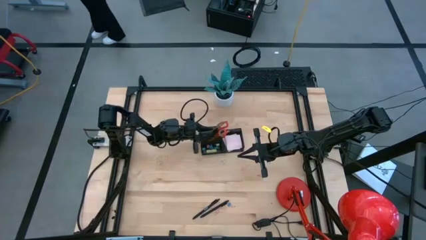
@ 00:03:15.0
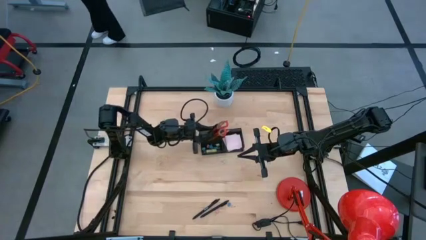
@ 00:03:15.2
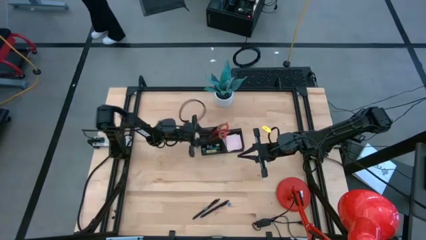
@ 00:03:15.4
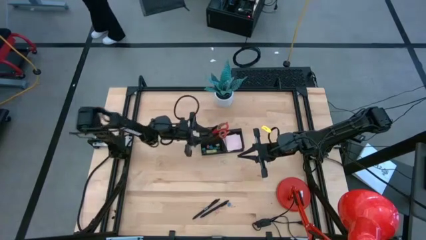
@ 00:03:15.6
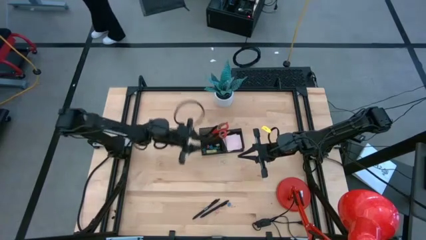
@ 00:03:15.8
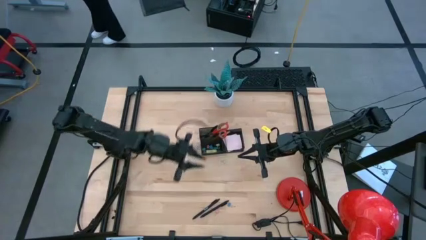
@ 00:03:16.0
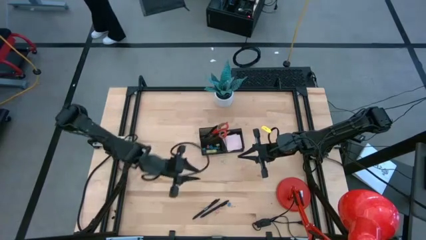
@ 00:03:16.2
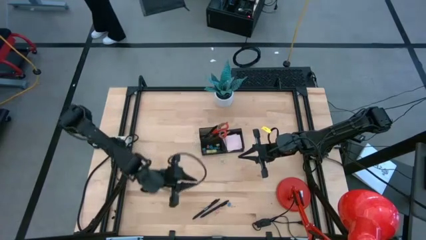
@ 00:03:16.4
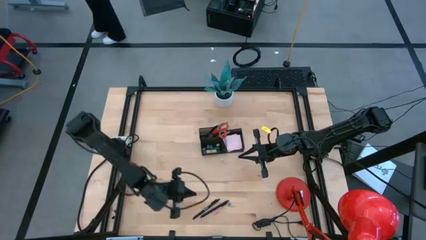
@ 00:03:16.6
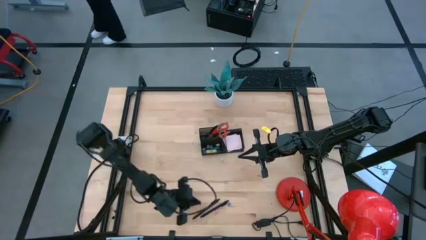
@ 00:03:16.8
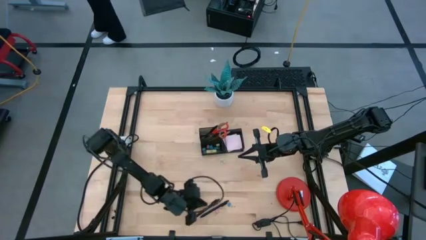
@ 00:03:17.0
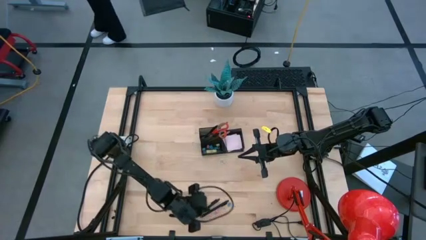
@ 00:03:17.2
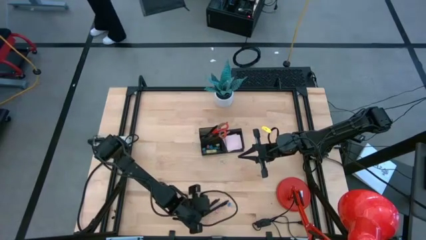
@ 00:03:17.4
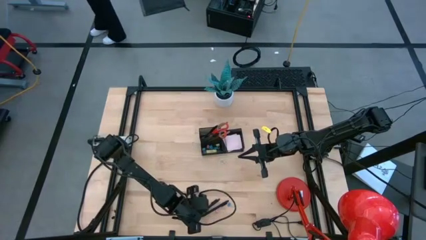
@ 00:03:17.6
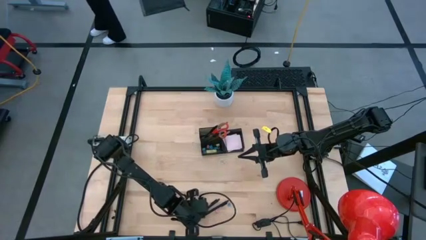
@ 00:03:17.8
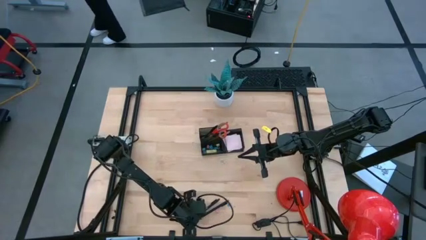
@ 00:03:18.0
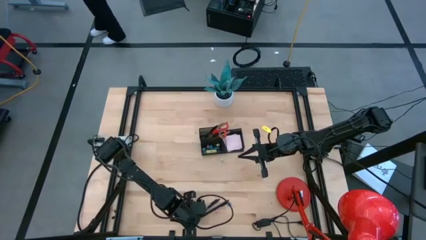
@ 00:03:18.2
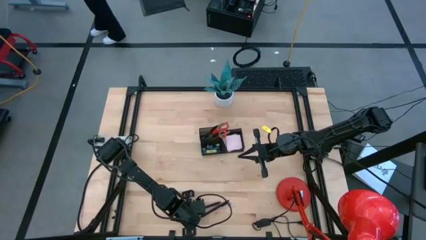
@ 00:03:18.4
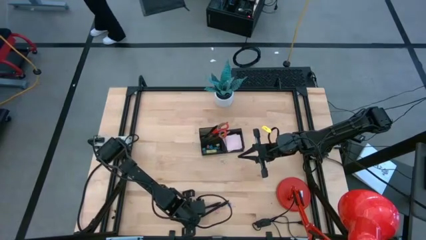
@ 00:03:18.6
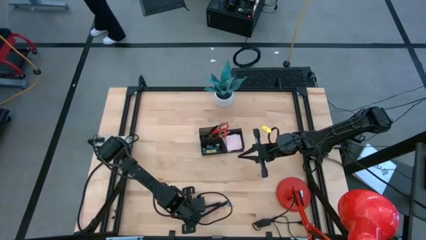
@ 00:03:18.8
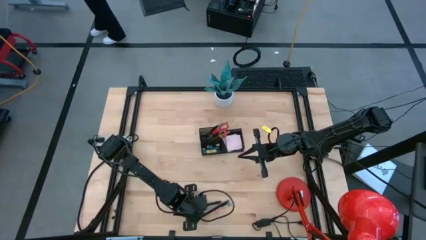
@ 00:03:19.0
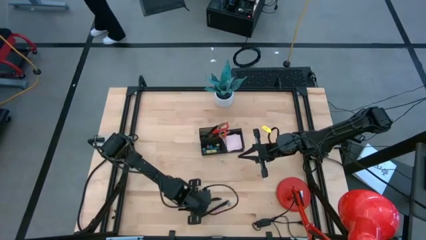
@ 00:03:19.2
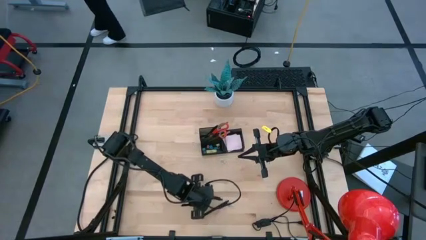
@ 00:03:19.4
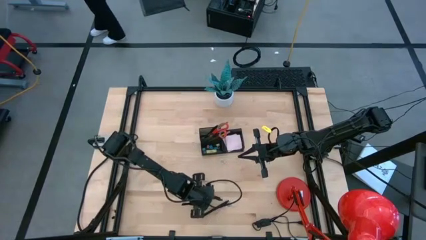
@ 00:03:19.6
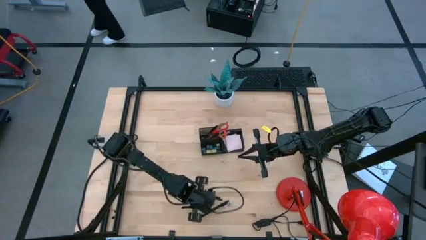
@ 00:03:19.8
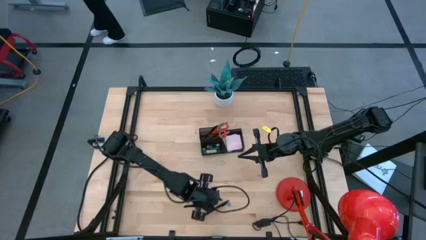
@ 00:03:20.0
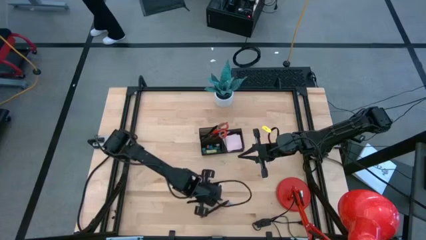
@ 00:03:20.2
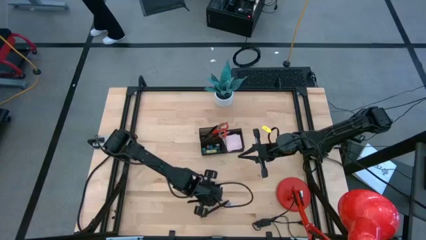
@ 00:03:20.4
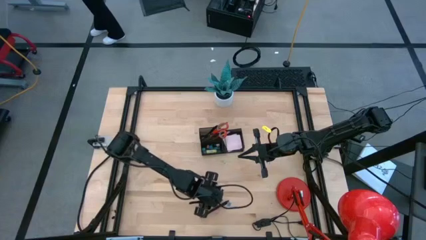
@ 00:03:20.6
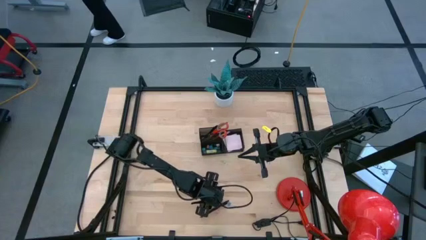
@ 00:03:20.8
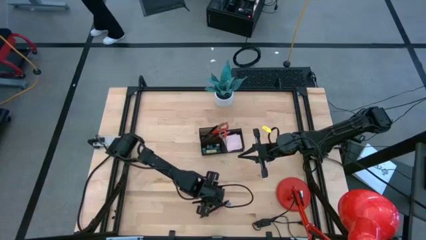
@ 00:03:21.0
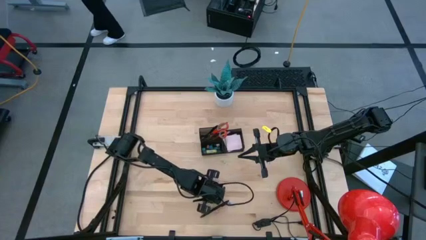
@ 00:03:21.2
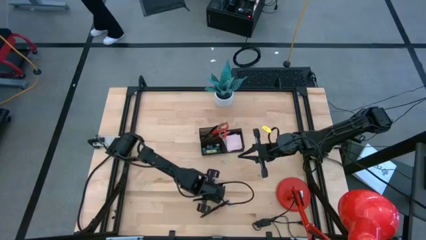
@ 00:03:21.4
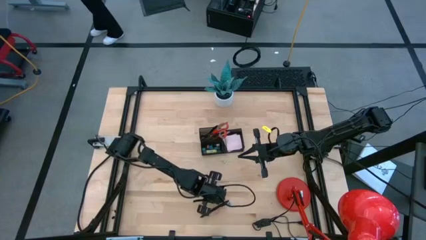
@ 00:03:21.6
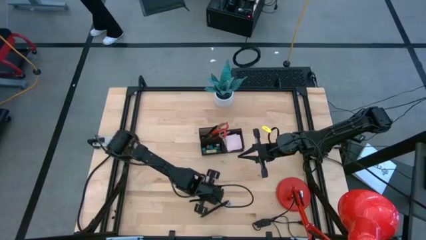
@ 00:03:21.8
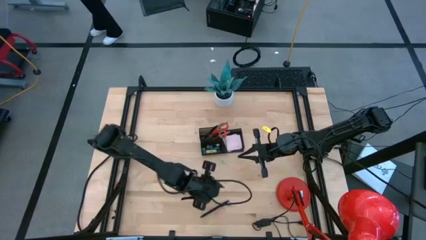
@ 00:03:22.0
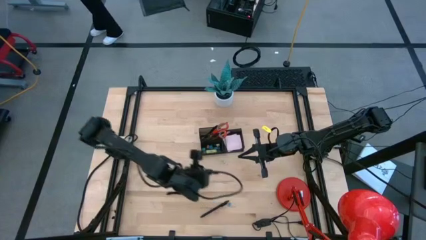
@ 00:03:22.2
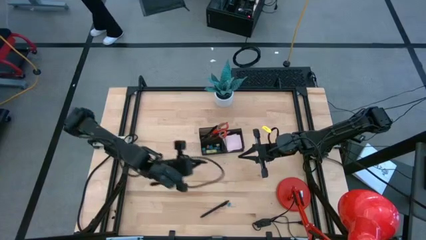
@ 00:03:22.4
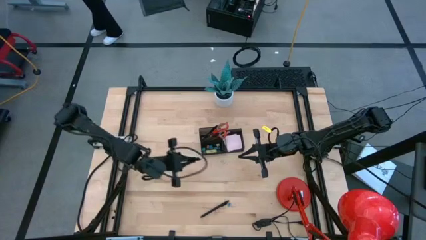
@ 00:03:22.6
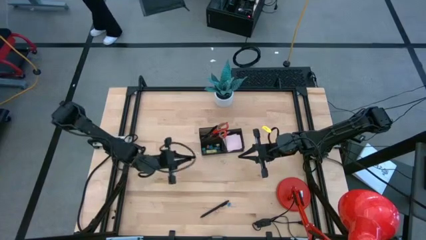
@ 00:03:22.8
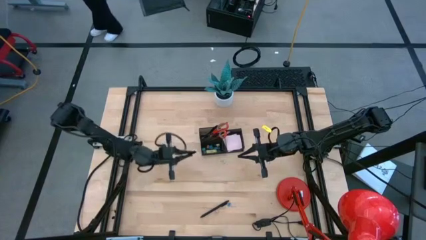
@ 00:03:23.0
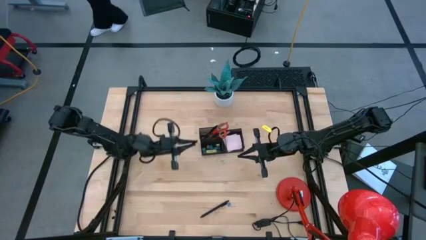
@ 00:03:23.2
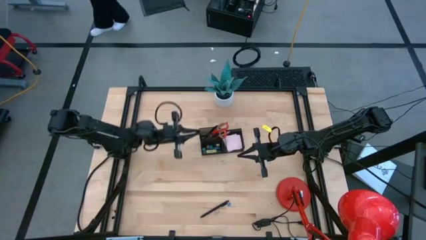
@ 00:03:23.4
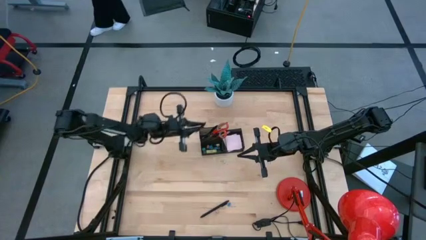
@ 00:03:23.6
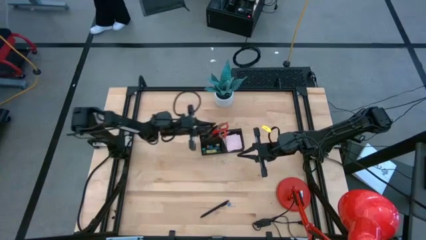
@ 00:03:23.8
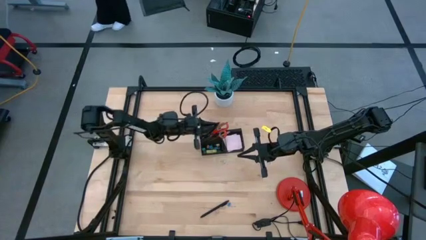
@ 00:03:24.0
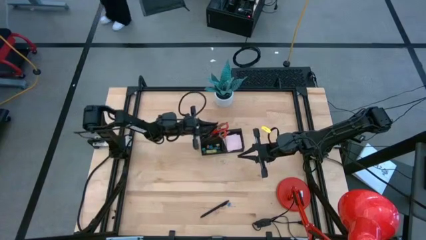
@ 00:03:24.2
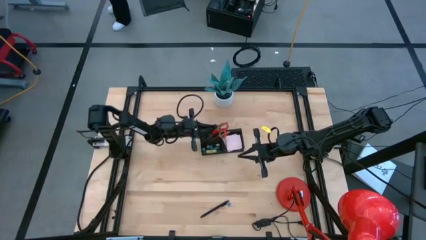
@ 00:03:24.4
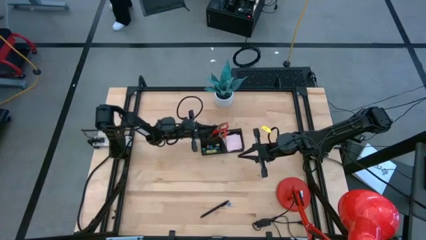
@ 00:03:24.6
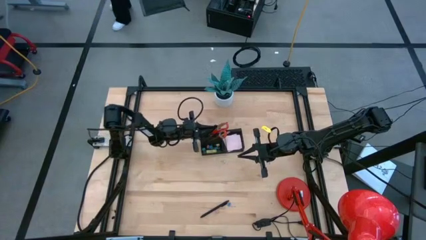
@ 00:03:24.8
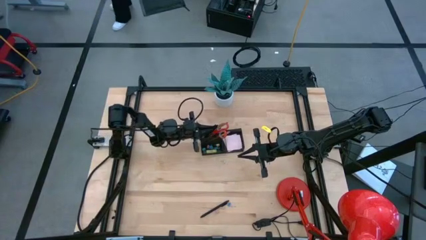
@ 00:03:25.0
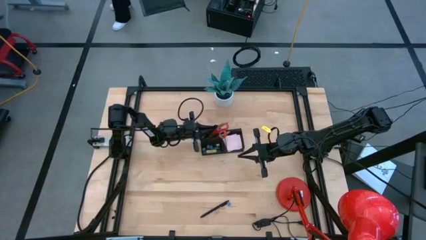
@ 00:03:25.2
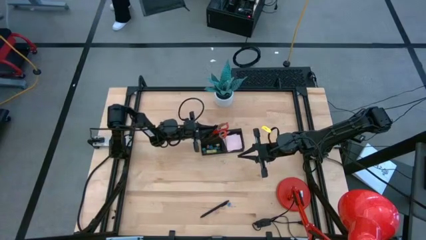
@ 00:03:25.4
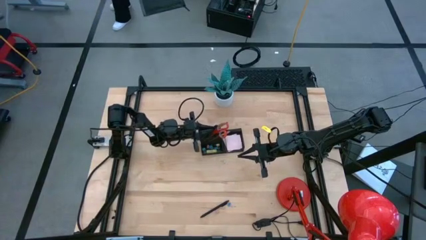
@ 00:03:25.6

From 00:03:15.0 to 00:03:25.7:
Task: Pick and place office supplies into organizer
Put the black pen into the black desk organizer

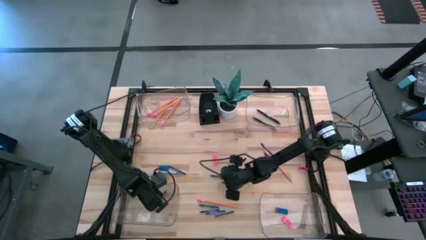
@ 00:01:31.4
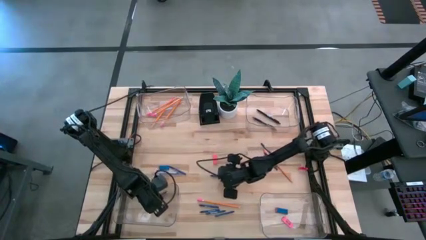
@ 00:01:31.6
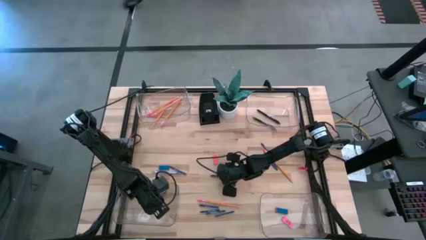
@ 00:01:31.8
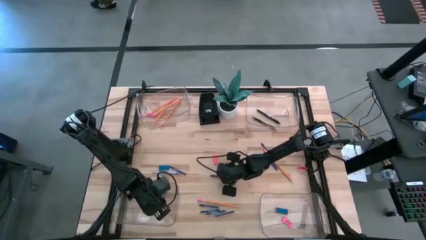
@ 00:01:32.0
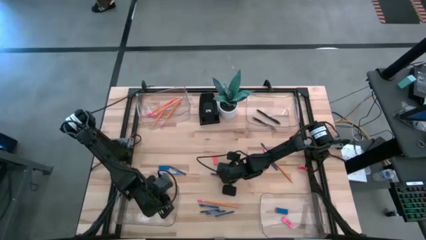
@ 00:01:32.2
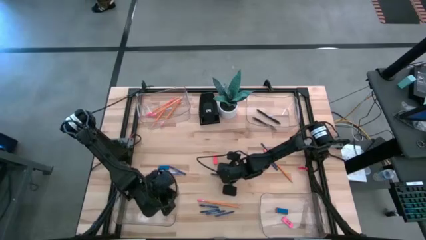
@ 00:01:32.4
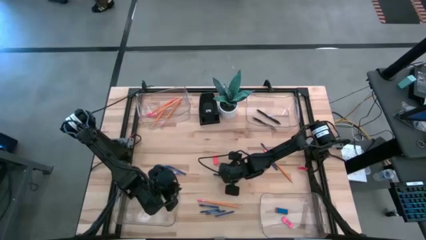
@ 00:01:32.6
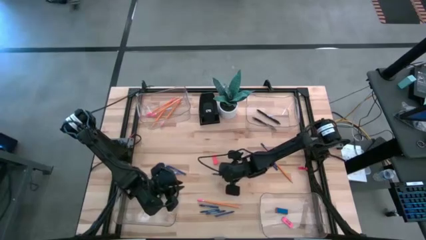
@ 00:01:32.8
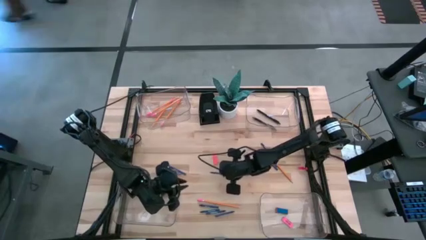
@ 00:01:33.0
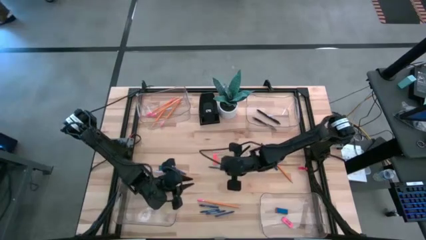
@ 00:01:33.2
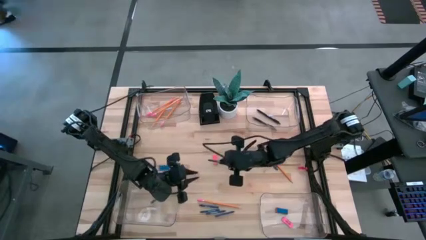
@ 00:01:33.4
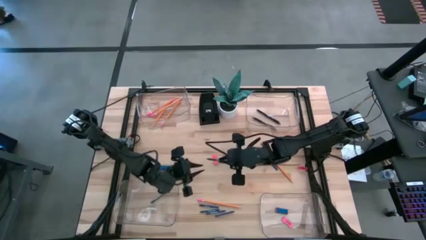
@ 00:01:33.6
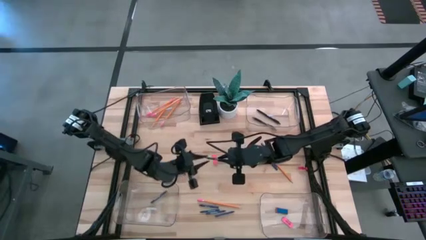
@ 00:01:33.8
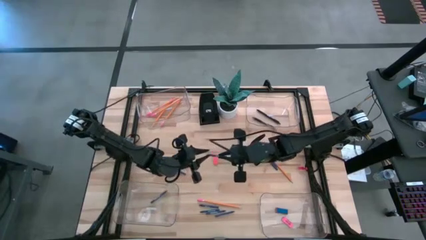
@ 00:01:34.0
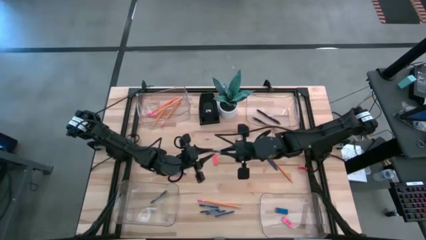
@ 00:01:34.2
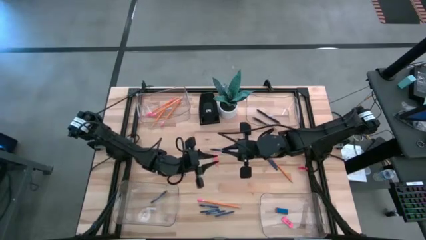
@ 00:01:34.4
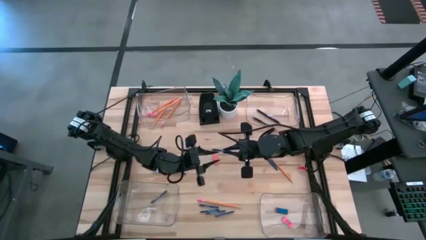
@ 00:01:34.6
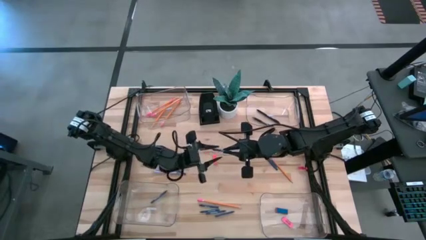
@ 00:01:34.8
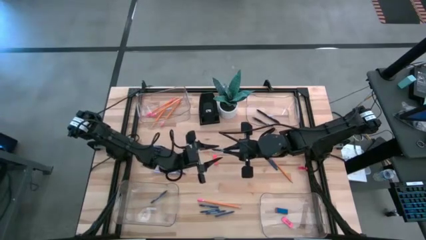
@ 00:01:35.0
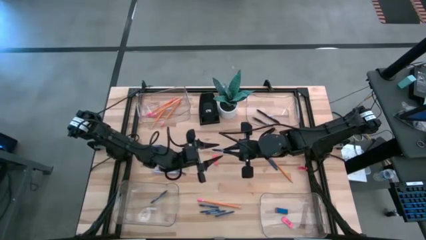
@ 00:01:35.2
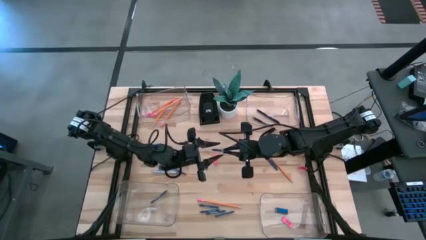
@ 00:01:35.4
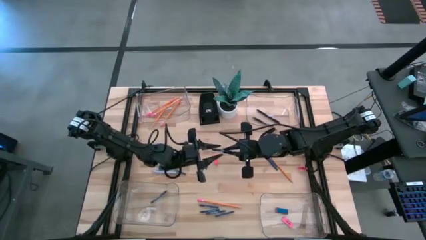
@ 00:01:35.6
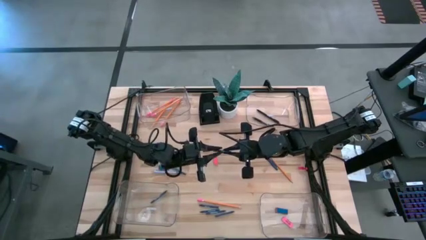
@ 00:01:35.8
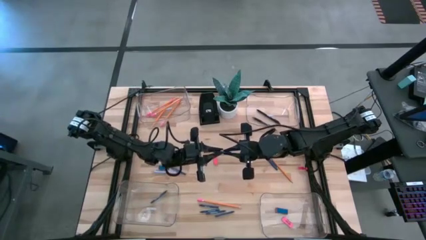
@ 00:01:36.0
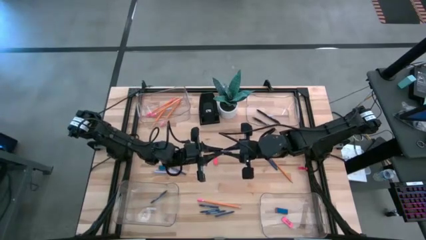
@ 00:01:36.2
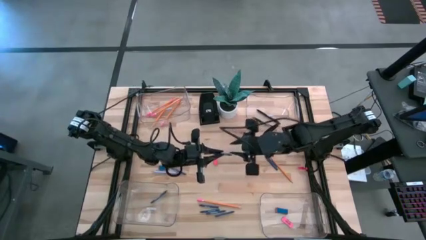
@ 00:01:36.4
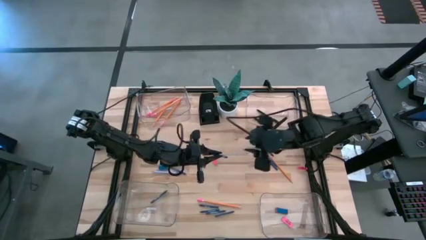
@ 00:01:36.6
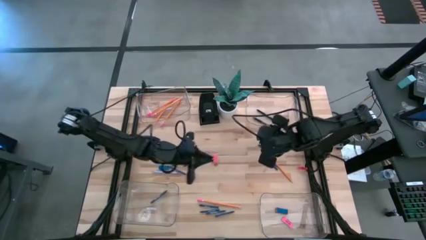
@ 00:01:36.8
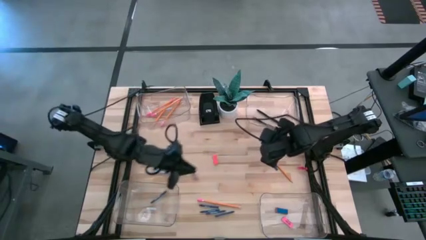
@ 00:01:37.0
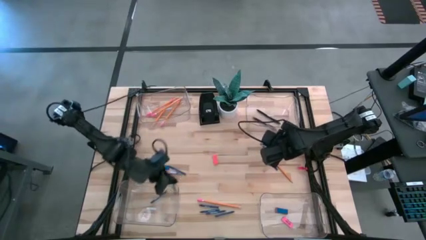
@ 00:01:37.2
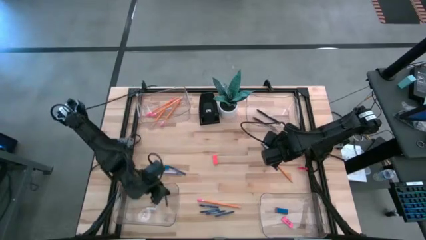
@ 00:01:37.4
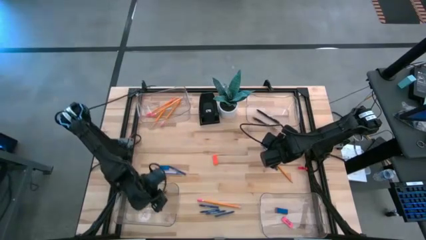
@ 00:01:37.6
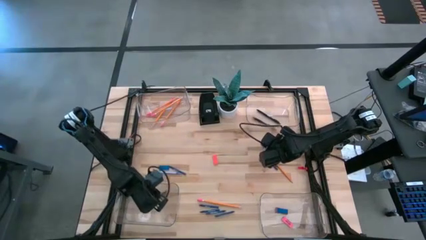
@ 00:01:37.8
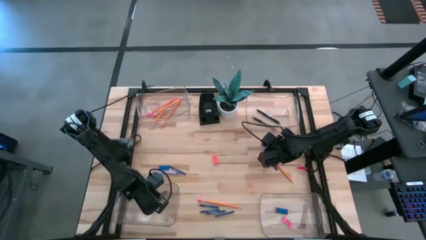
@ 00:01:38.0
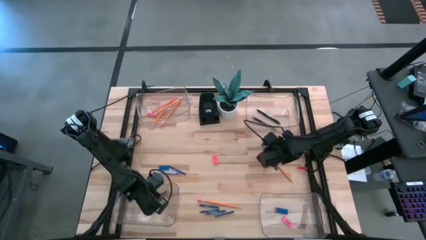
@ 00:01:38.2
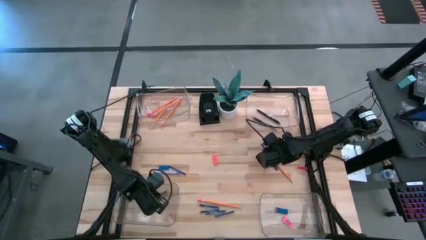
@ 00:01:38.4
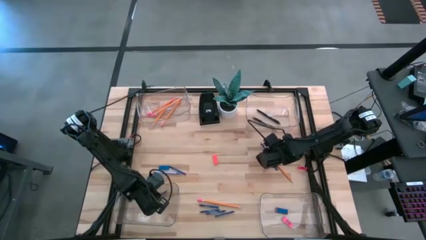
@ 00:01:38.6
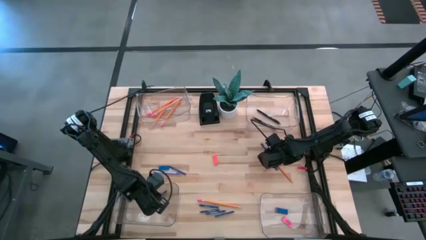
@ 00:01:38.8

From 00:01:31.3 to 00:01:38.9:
Task: Sort crayons/erasers/pens/pencils in bins
Put the blue crayon into the bottom left transparent bin
